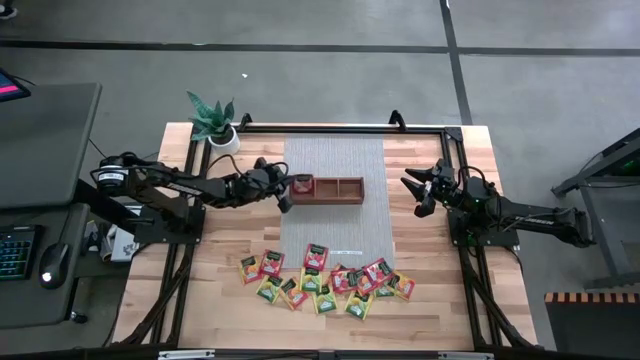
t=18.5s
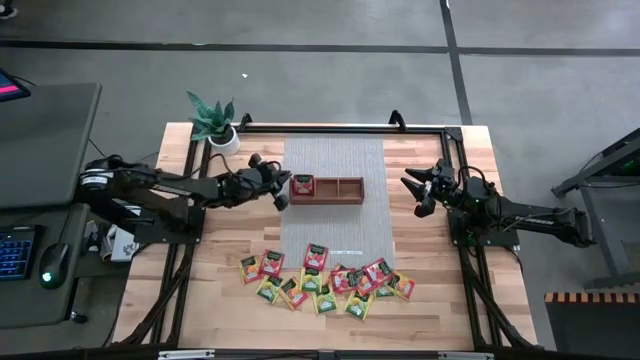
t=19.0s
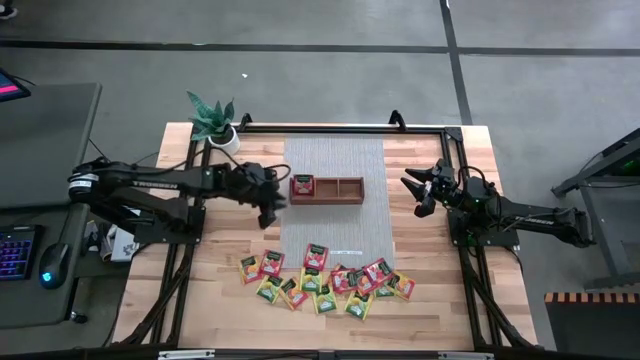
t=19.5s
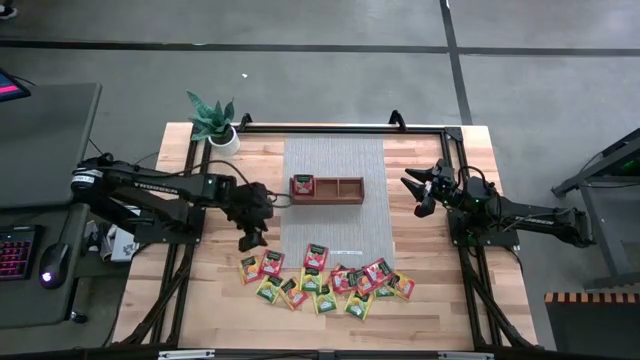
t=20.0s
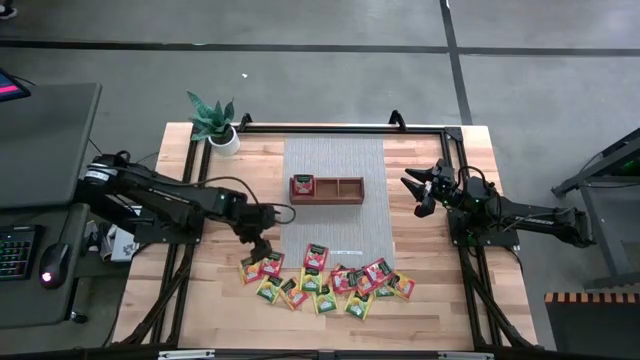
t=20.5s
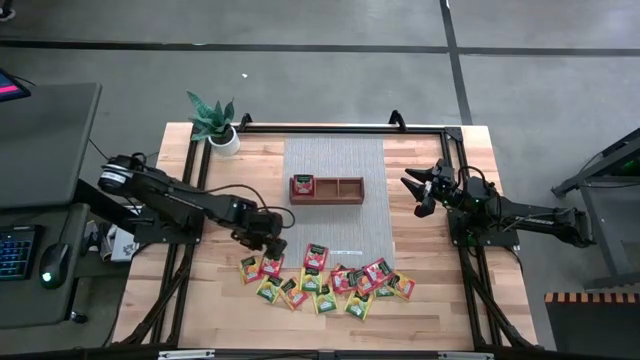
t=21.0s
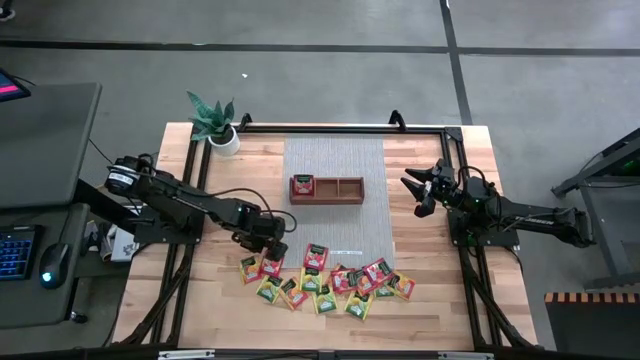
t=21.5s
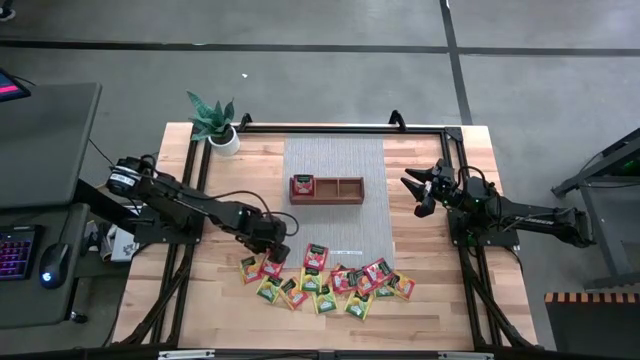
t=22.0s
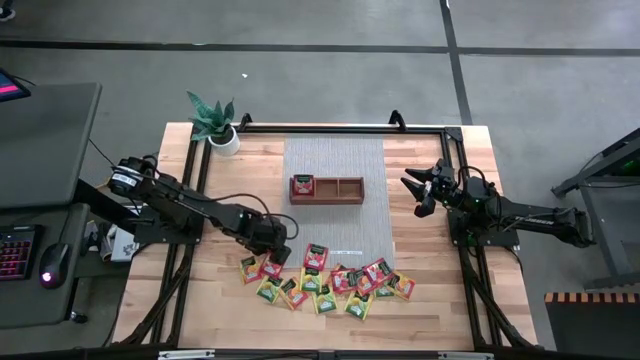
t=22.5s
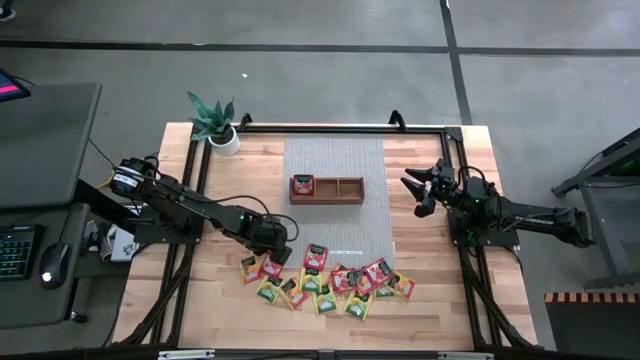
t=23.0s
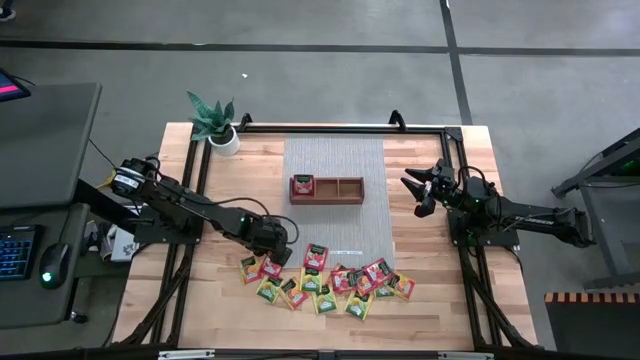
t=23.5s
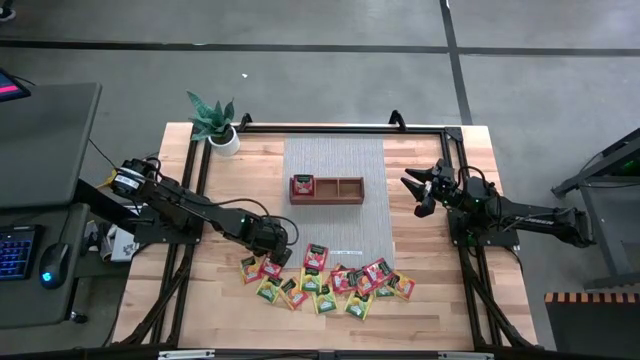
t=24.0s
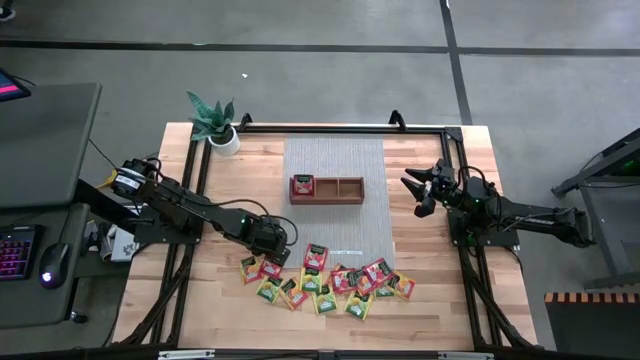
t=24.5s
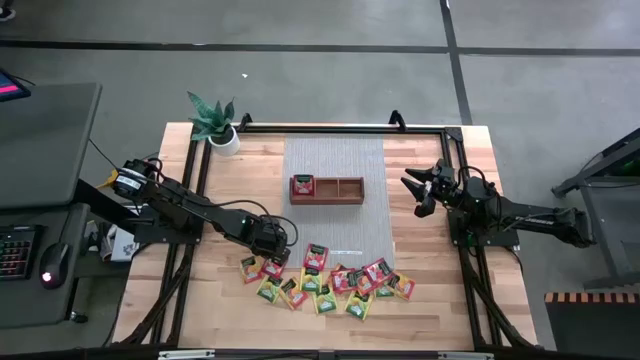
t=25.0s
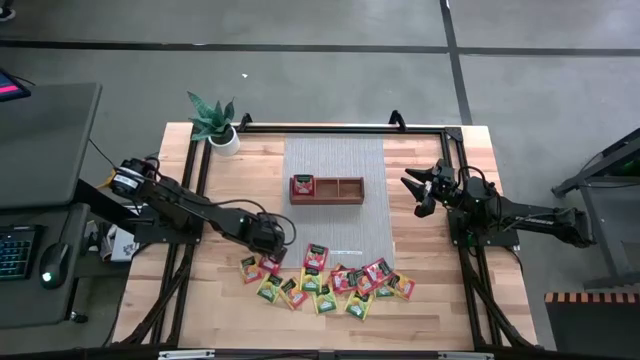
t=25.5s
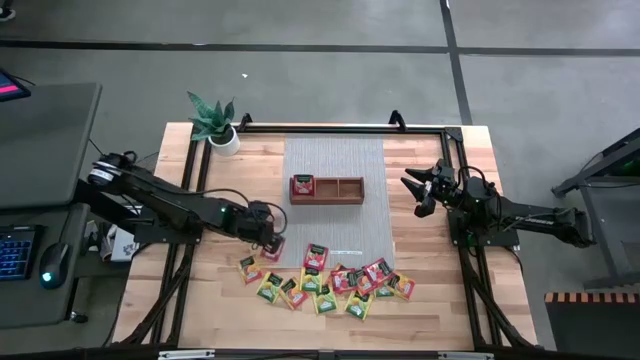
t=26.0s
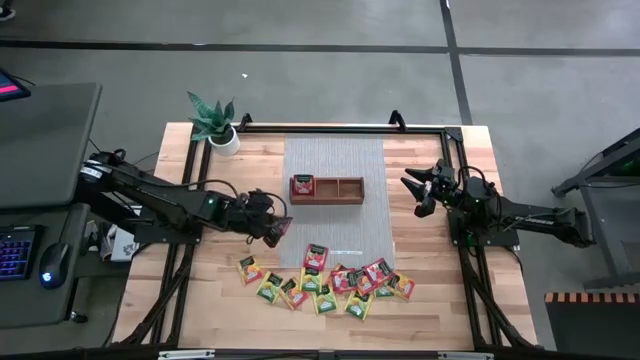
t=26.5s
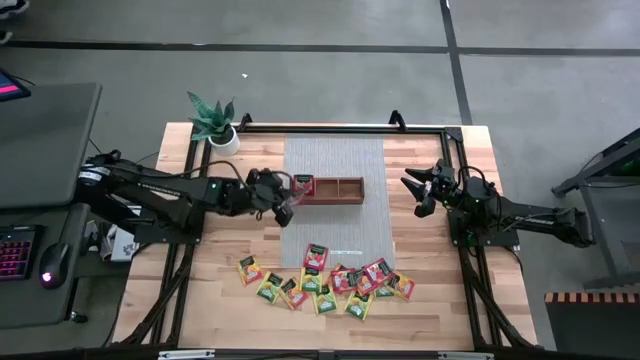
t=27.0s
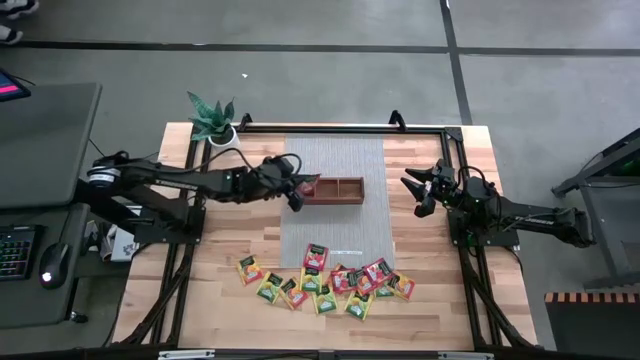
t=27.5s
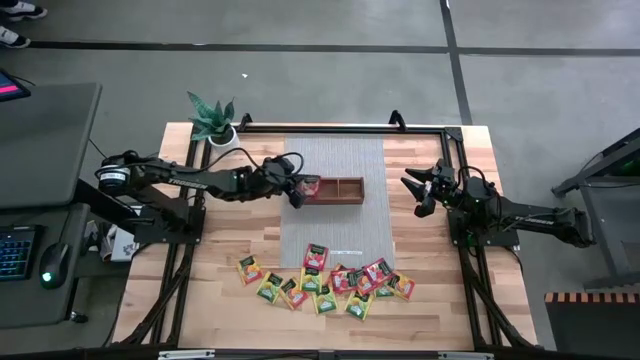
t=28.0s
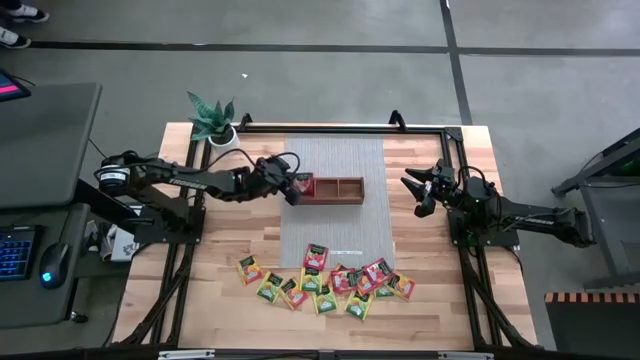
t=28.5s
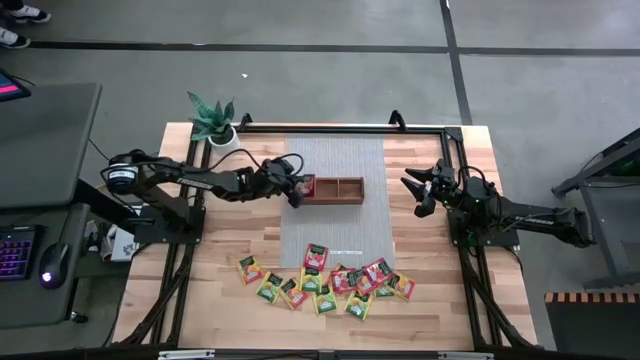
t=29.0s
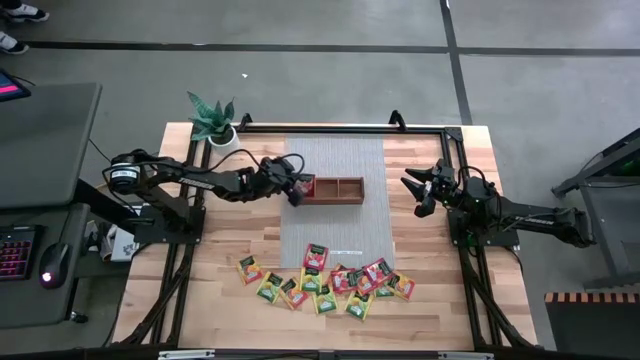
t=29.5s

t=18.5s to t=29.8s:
Task: Pick & Place Tea
Put the red tea bag into the left section of the wooden organizer

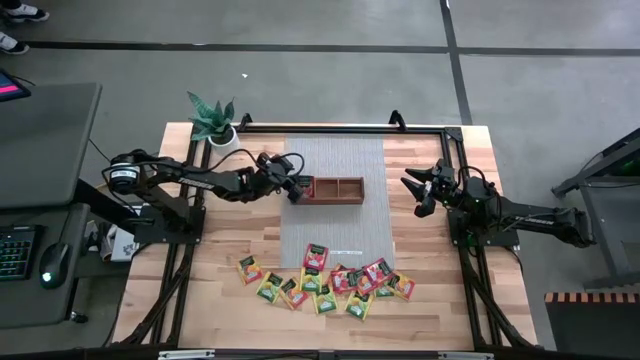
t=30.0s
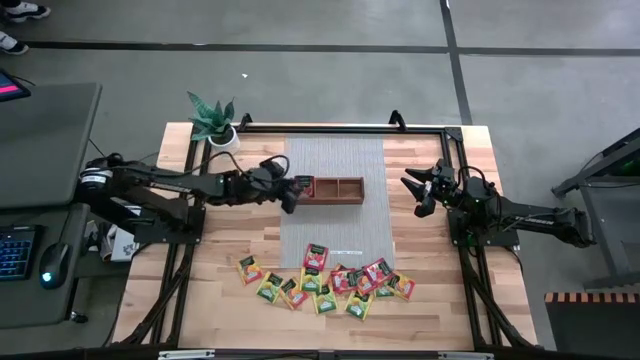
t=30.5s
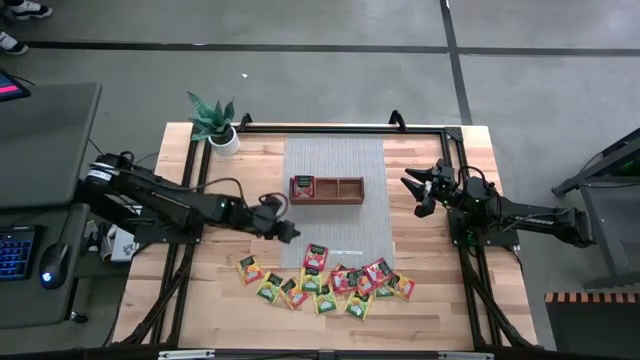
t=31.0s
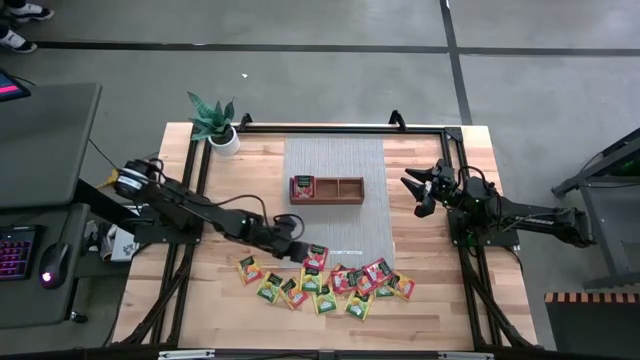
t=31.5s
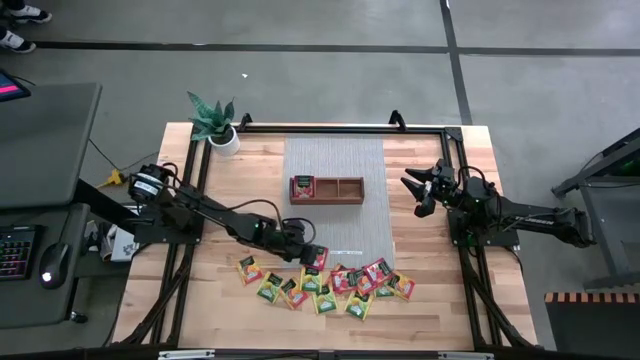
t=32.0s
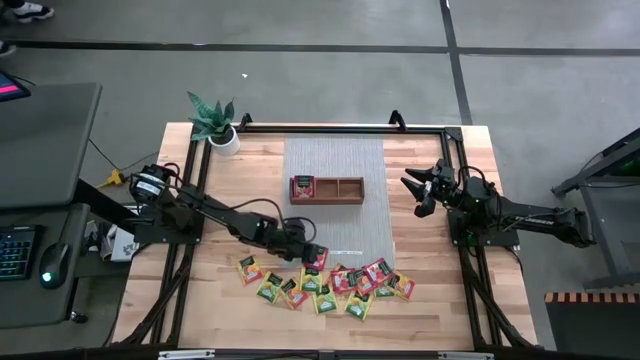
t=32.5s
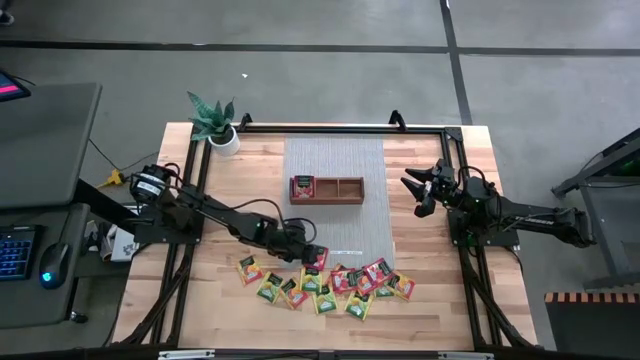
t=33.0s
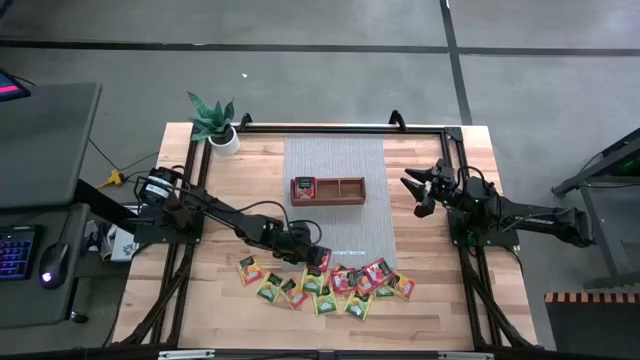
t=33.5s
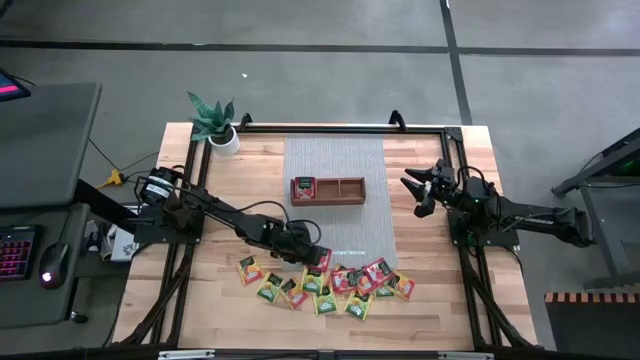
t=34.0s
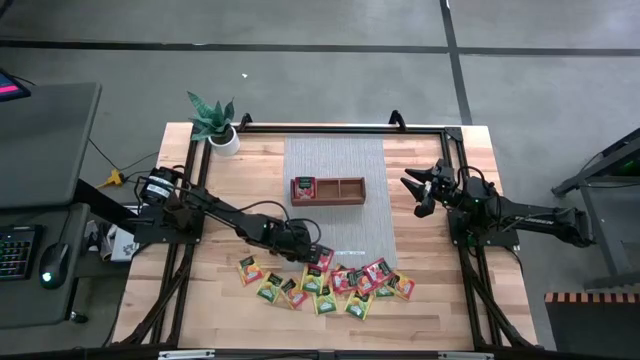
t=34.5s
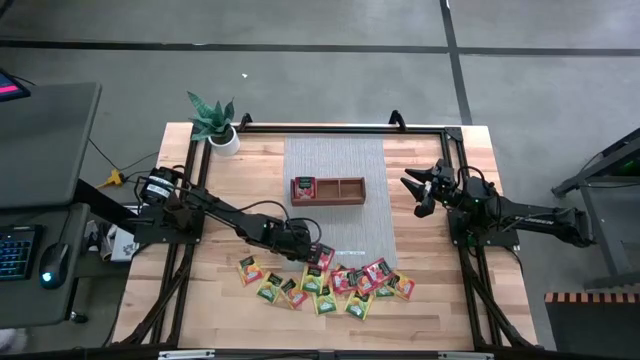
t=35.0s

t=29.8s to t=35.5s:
Put the red tea bag into the left section of the wooden organizer

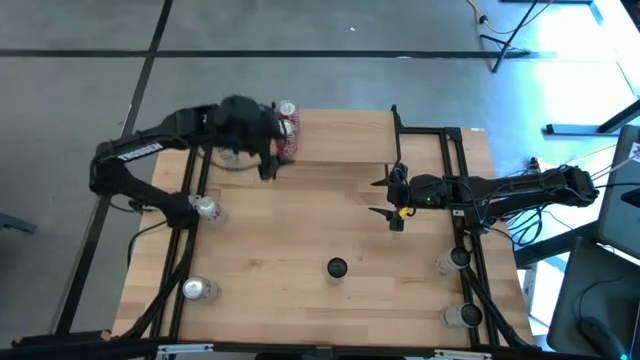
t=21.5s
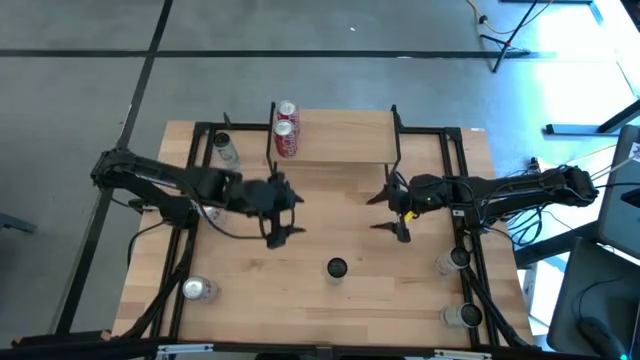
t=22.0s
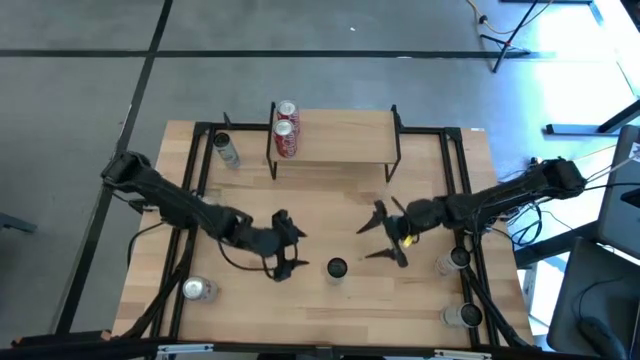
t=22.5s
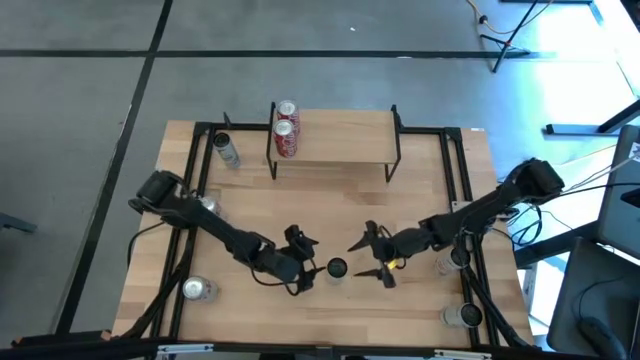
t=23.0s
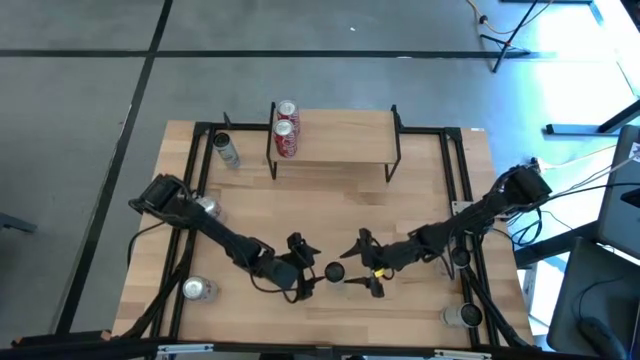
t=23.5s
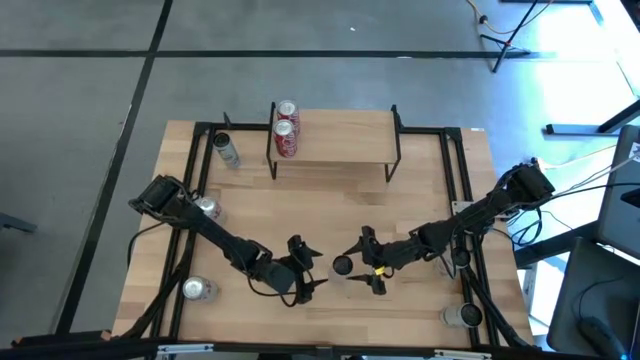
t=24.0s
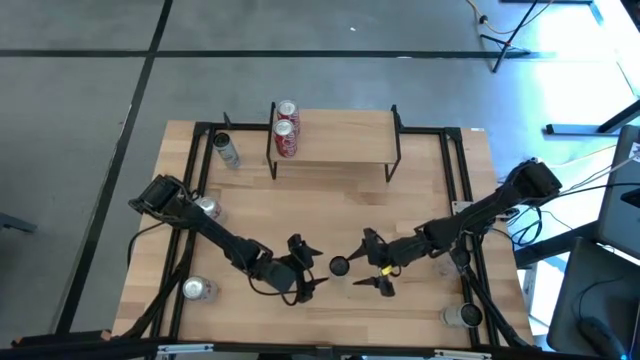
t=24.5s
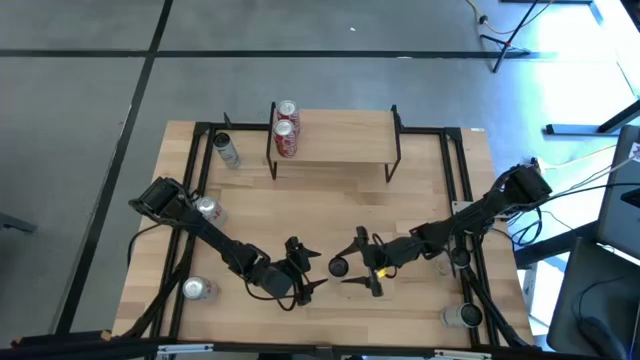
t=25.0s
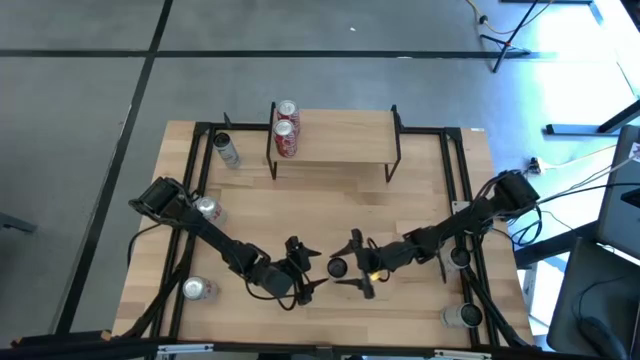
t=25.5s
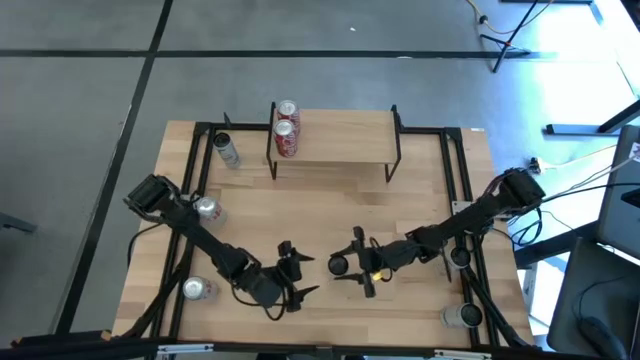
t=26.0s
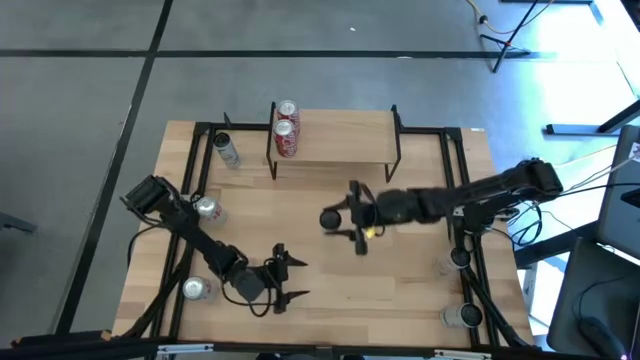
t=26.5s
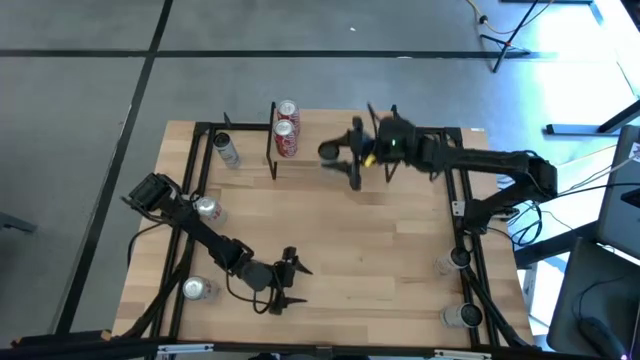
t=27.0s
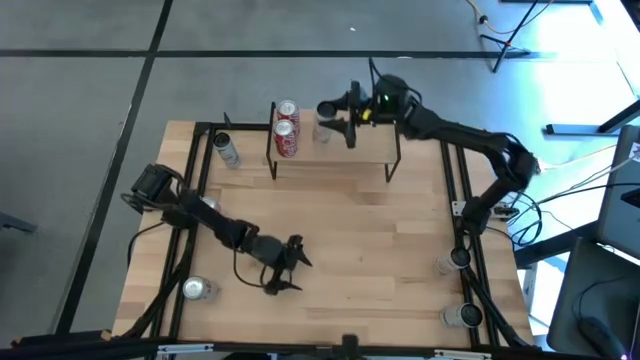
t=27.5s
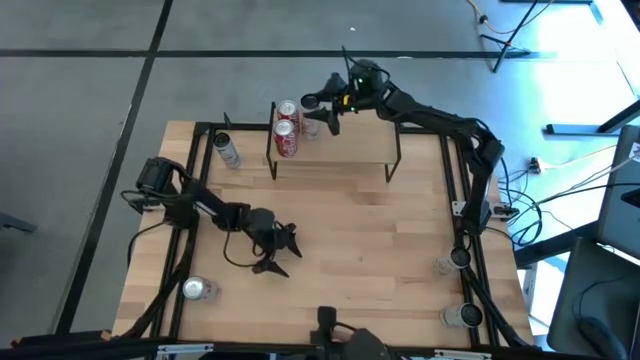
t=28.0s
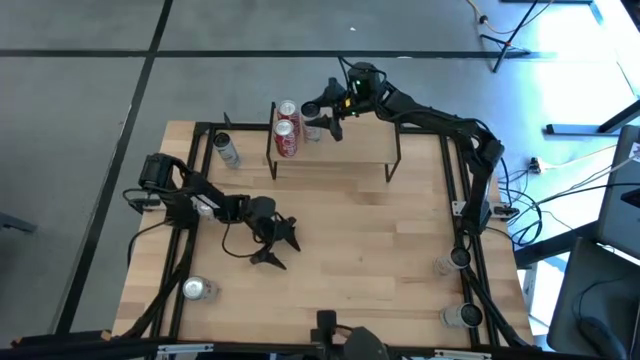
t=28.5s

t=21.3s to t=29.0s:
Task: Place canned beverage on shelf
Put the left white-pink soda can on the shelf
